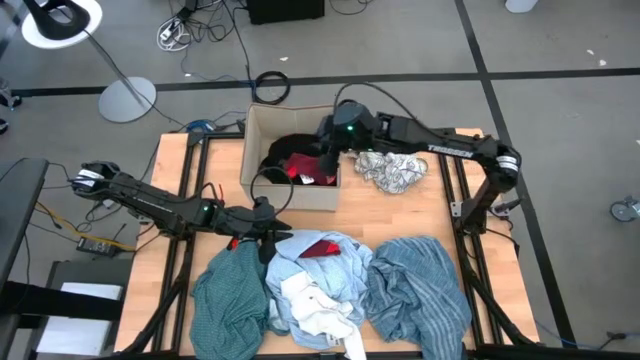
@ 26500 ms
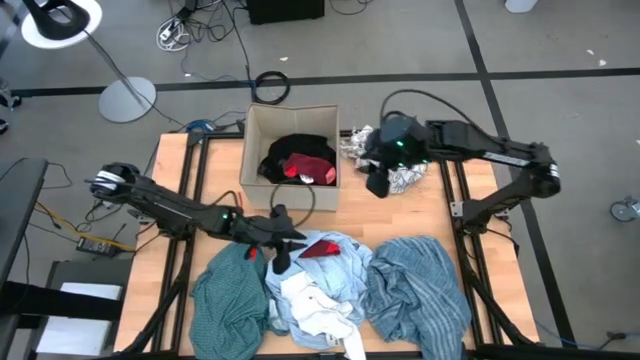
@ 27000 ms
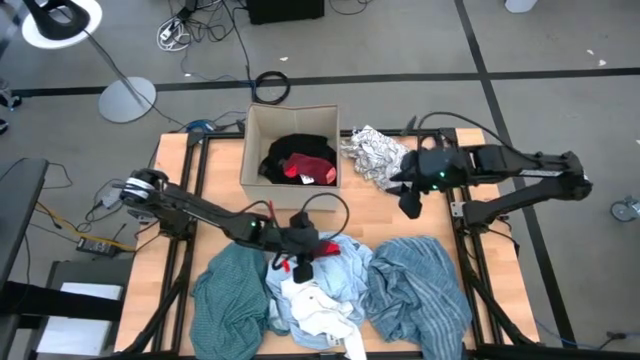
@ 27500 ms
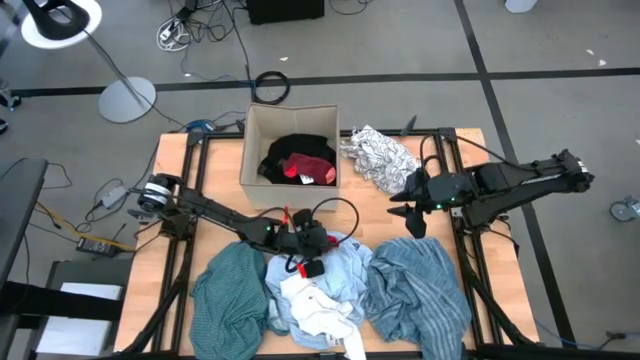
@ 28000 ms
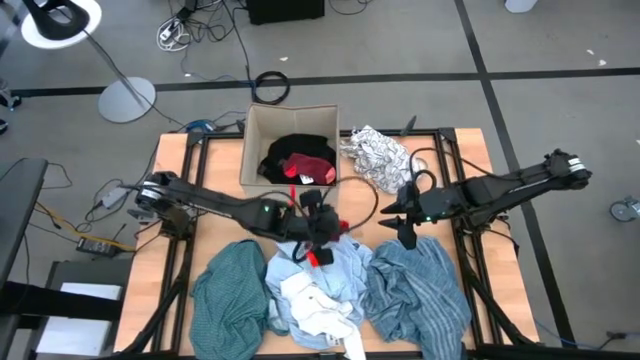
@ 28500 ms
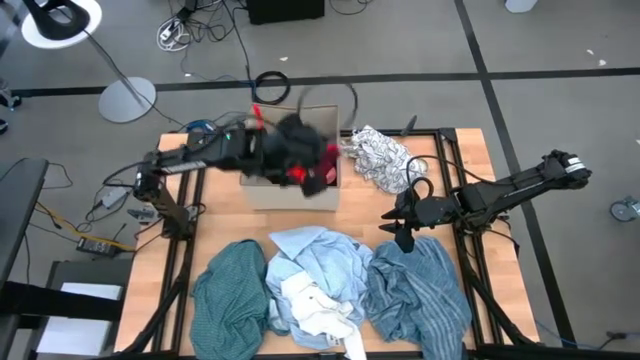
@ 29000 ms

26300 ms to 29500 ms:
Task: Sort clothes
Put the red sock into the laundry organizer

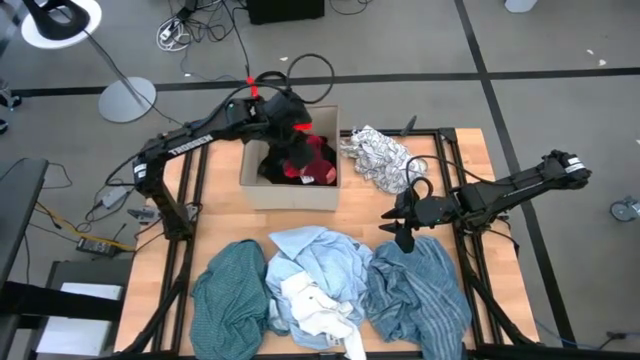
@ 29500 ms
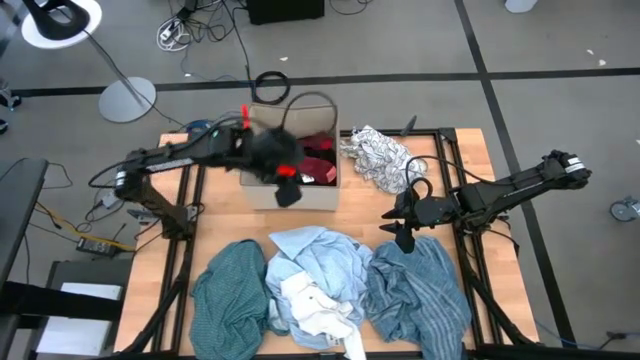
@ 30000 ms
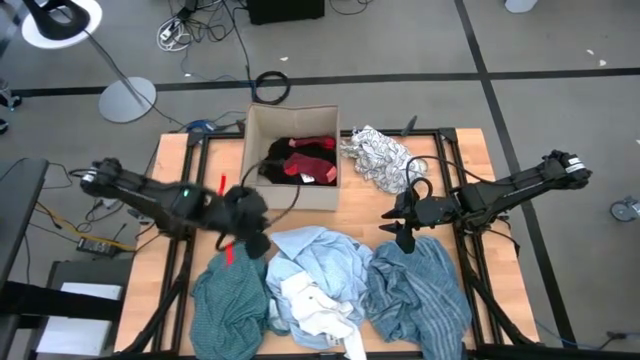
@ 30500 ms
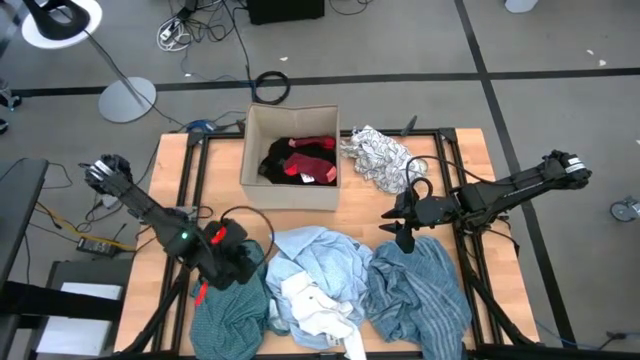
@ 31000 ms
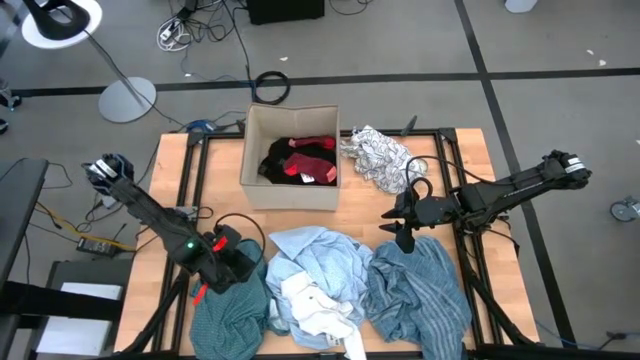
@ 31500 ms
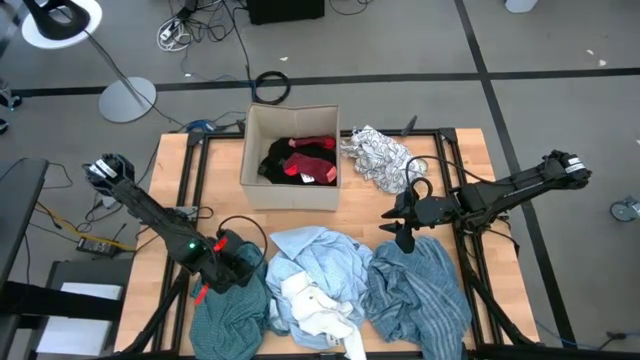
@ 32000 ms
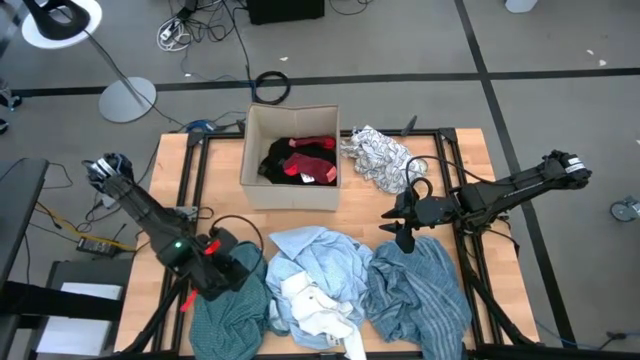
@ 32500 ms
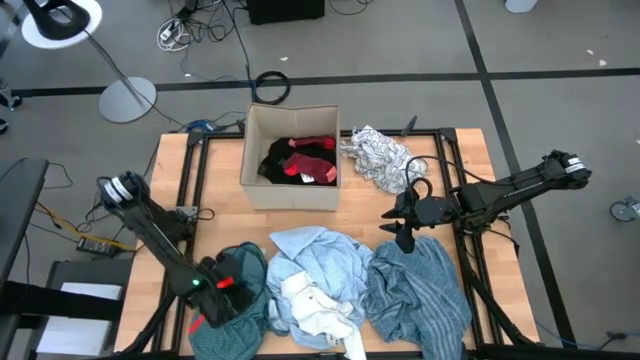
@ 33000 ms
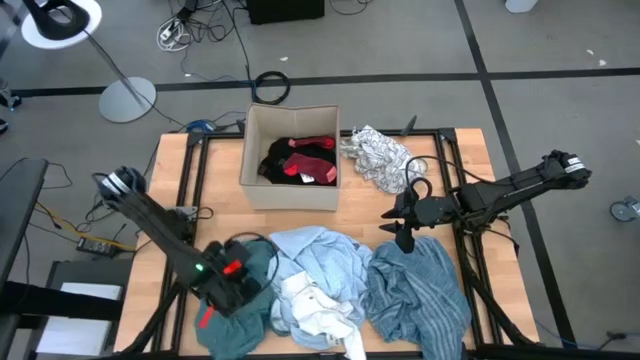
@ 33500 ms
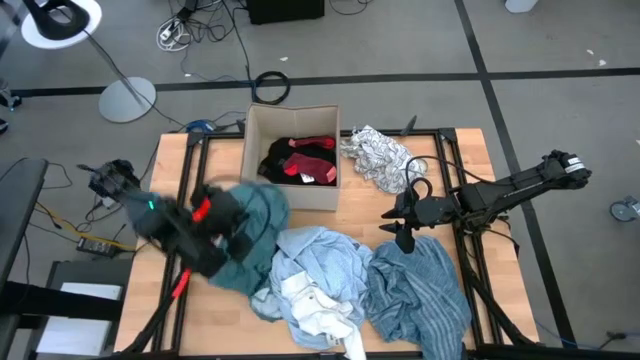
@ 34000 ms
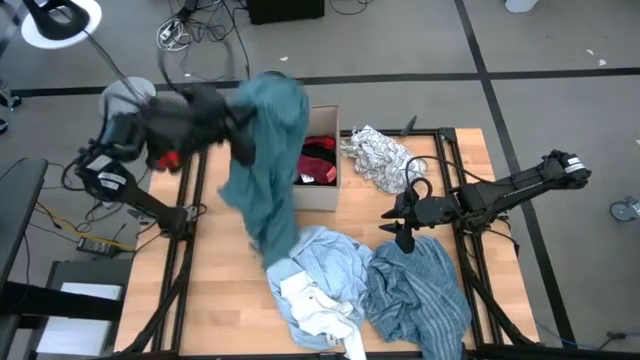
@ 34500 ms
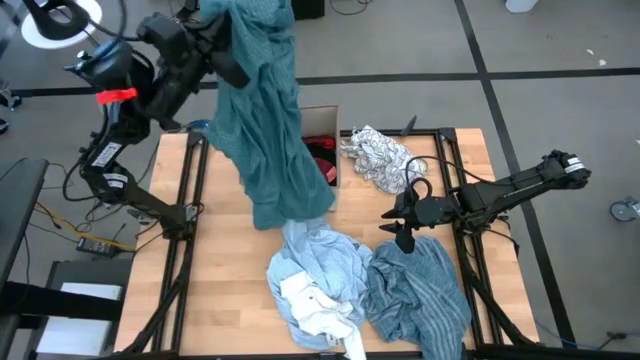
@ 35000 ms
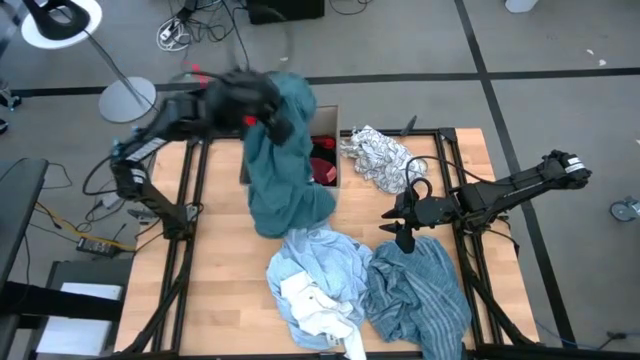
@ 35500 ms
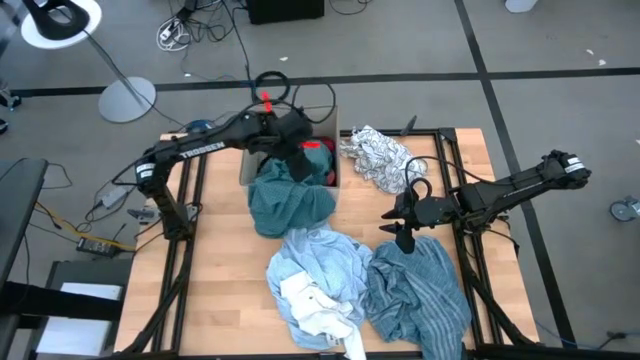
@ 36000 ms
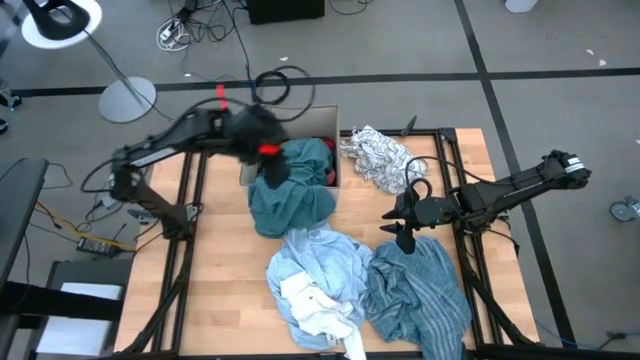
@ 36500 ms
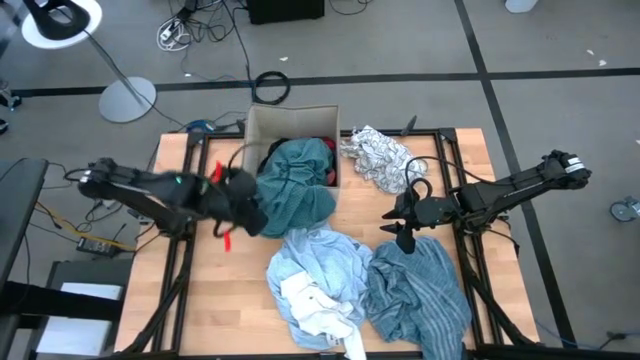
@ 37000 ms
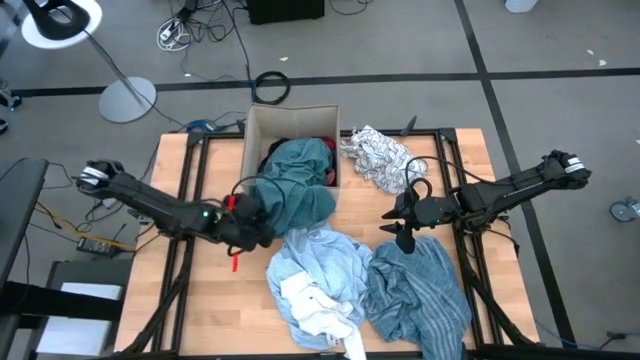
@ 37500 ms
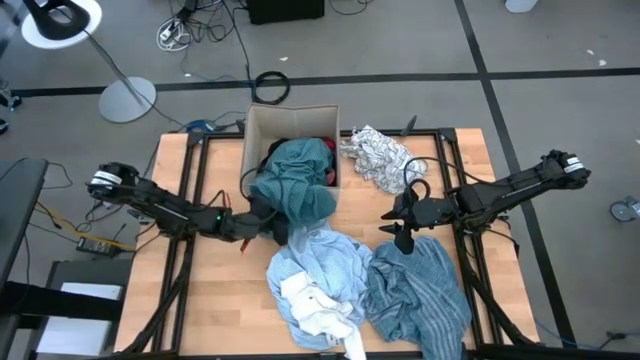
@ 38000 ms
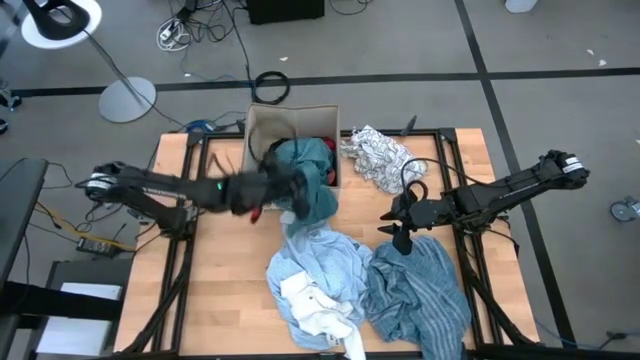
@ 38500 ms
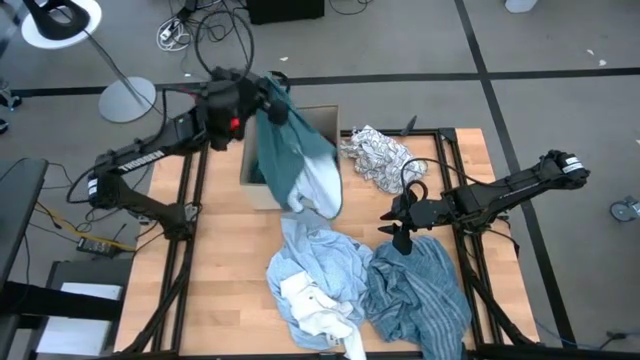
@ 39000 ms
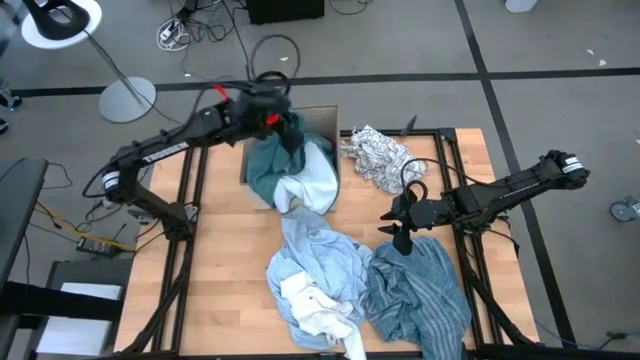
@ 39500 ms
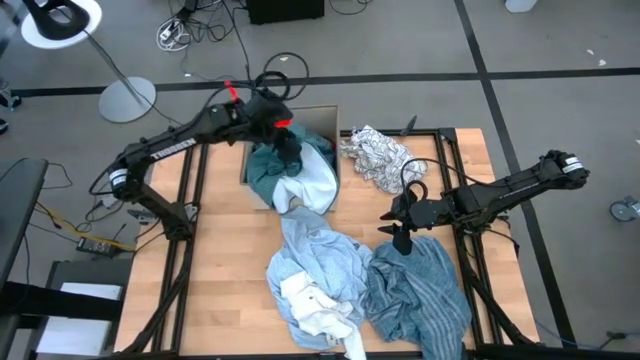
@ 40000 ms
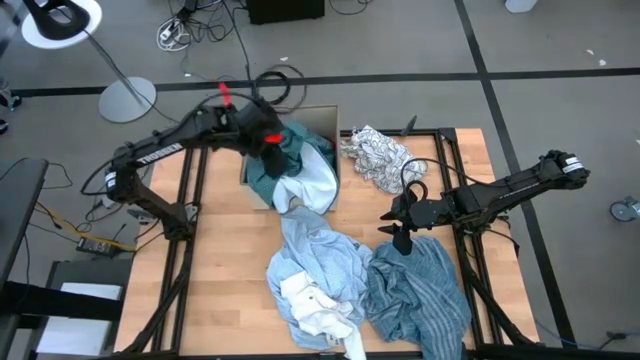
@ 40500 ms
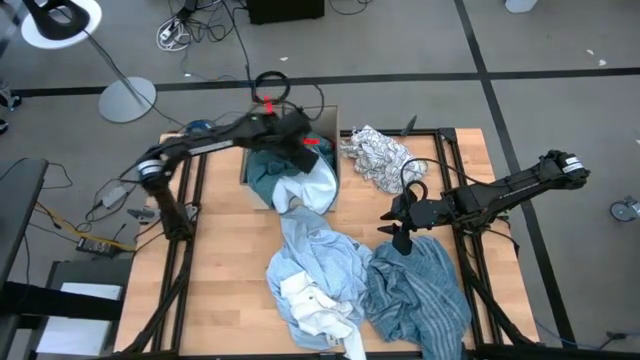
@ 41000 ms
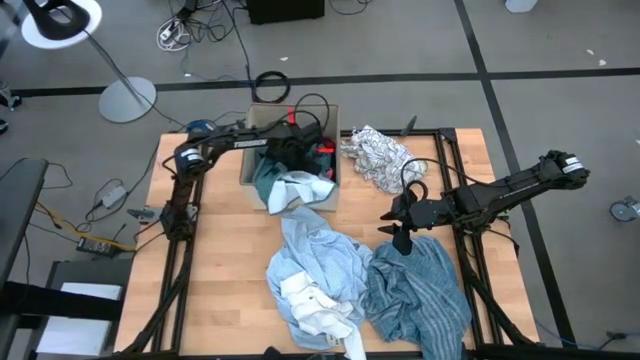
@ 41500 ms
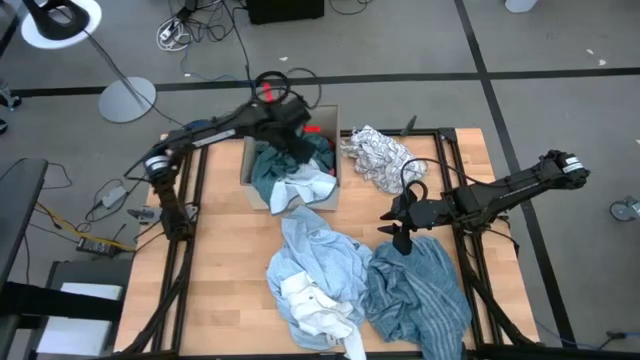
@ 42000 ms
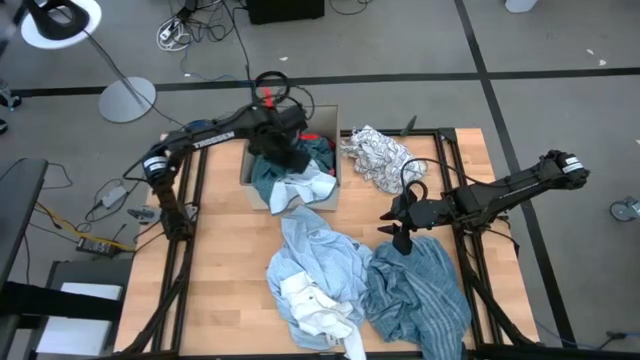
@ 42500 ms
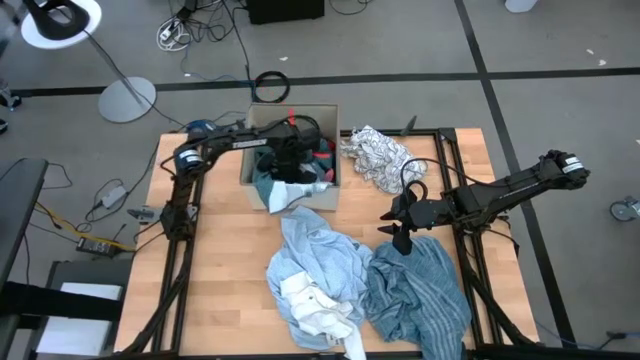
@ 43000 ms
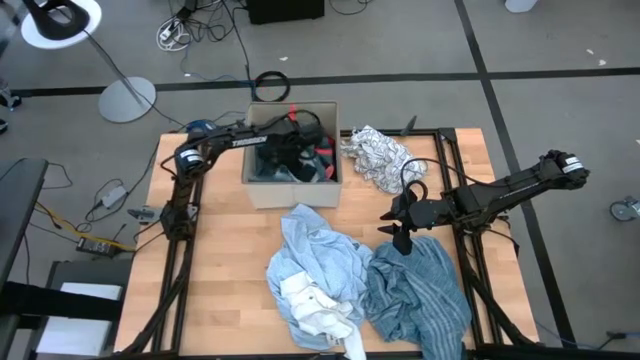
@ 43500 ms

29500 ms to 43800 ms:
Put the green cloth into the laundry organizer

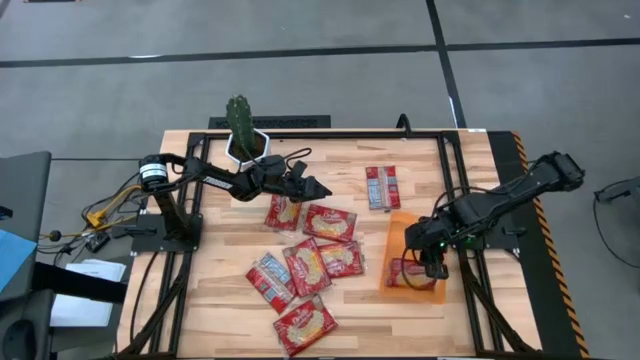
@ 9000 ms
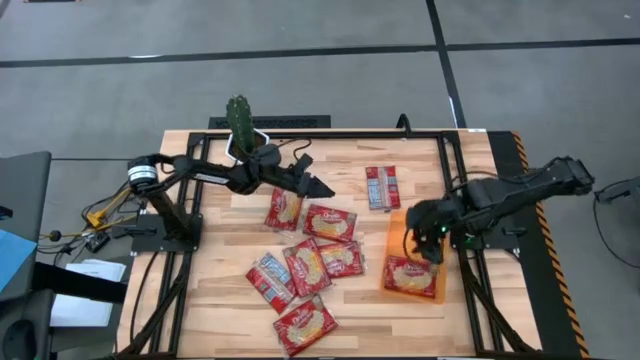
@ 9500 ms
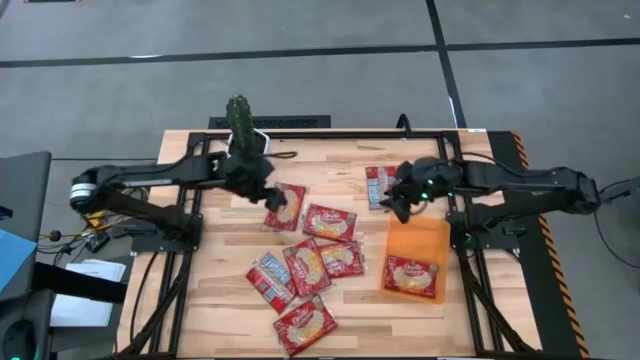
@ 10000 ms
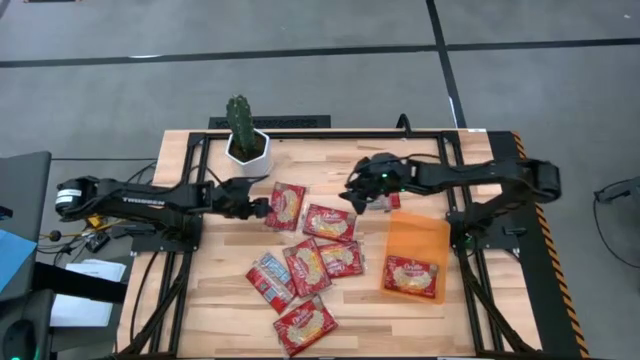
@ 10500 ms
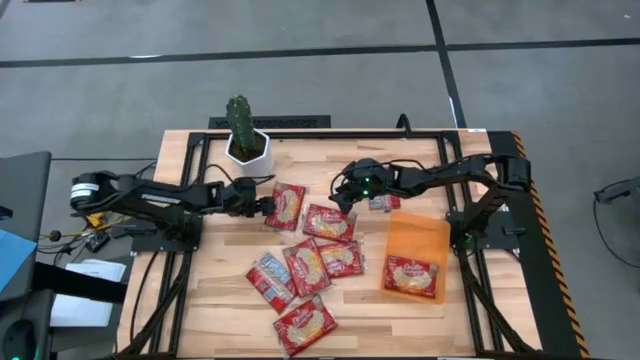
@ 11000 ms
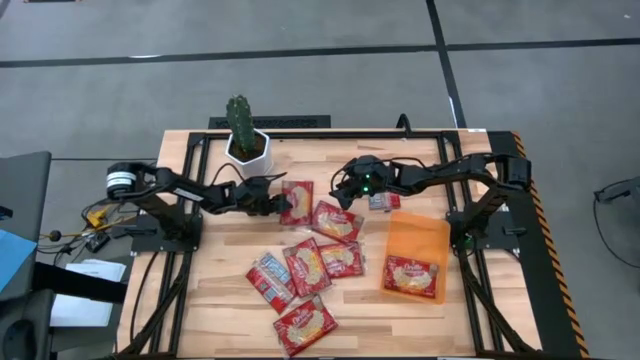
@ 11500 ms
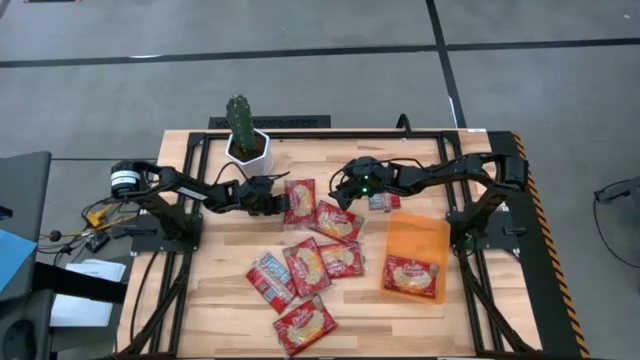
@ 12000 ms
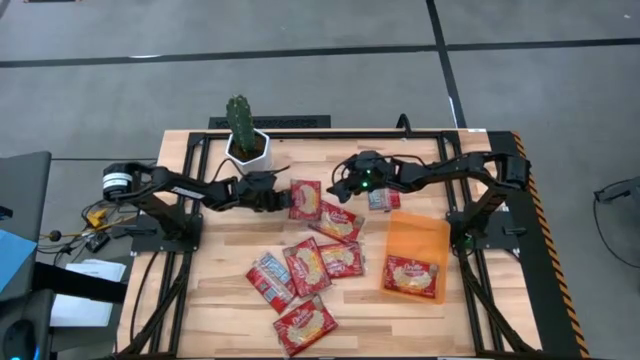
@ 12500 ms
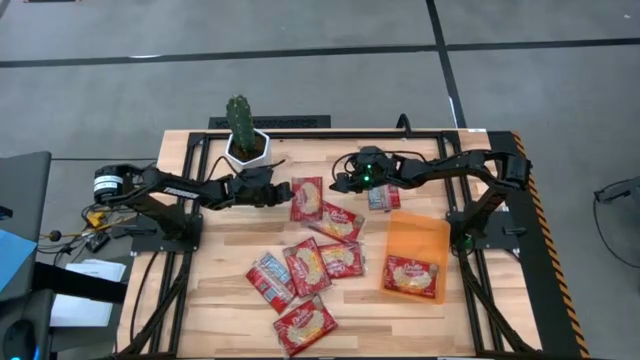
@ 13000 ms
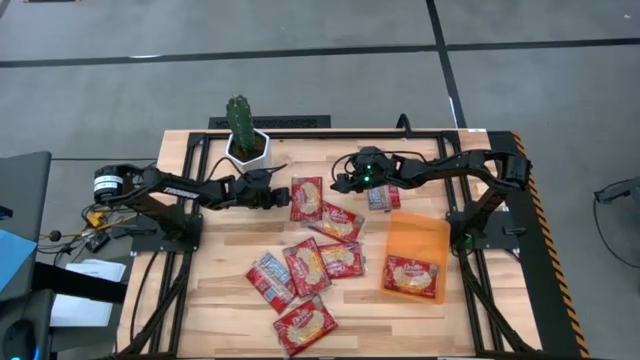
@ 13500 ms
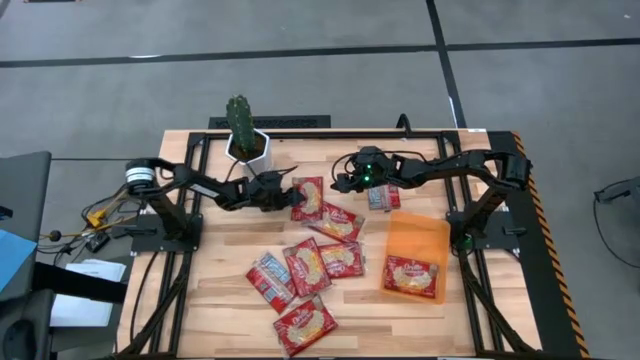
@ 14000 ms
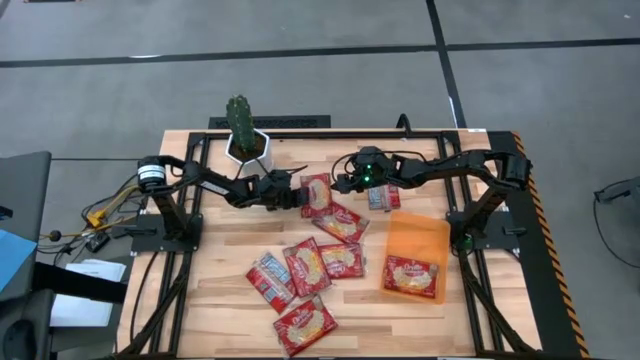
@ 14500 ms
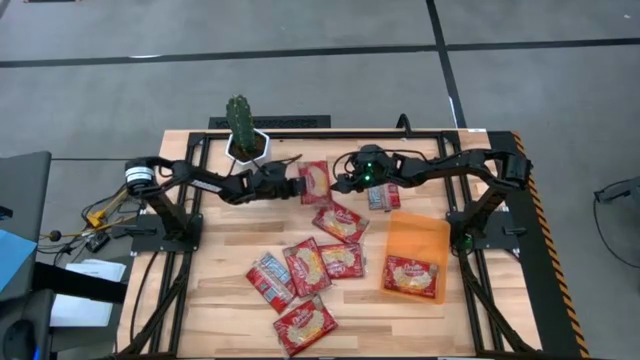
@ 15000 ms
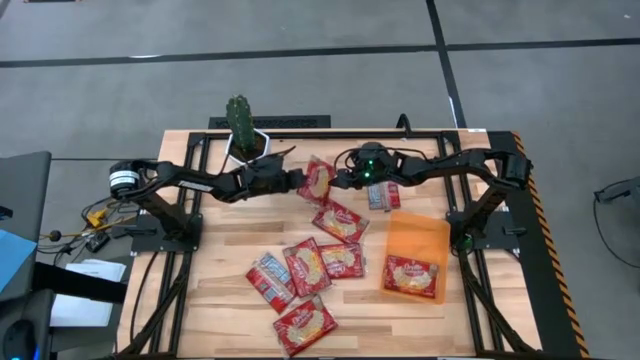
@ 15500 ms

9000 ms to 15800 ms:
Task: Sort popcorn bags into baskets
Put the popcorn bag into the orange bin
